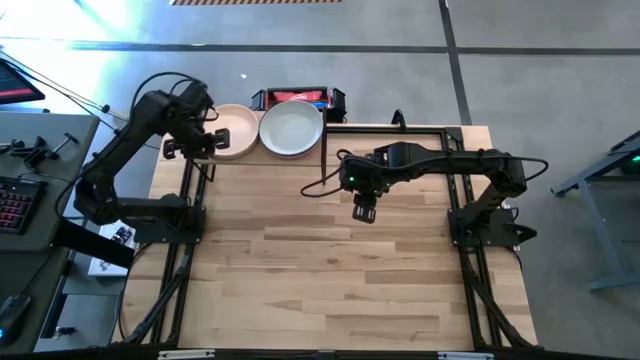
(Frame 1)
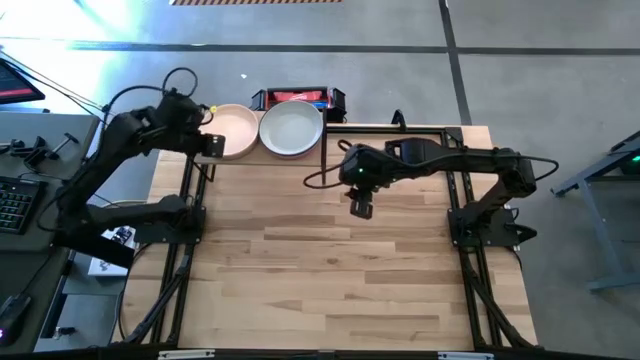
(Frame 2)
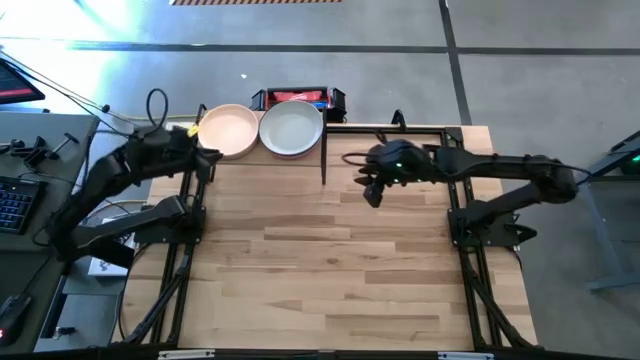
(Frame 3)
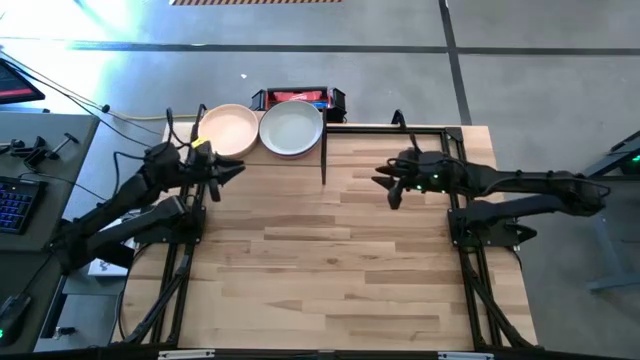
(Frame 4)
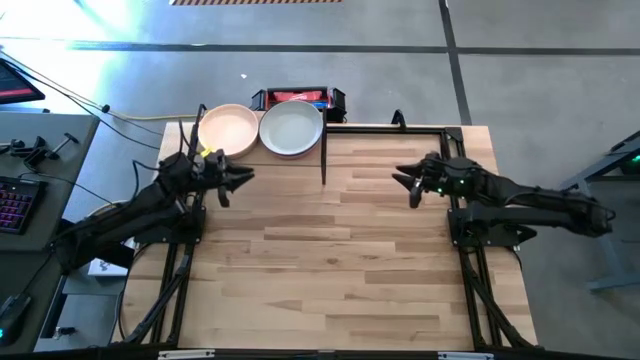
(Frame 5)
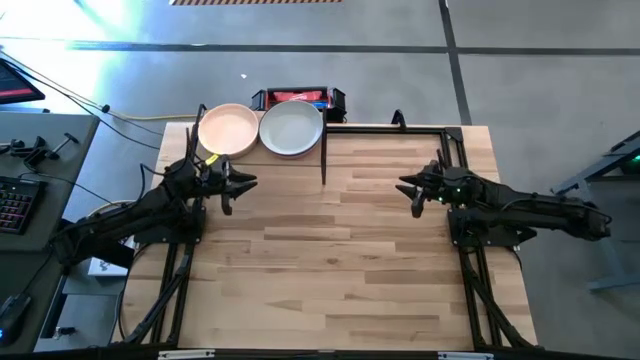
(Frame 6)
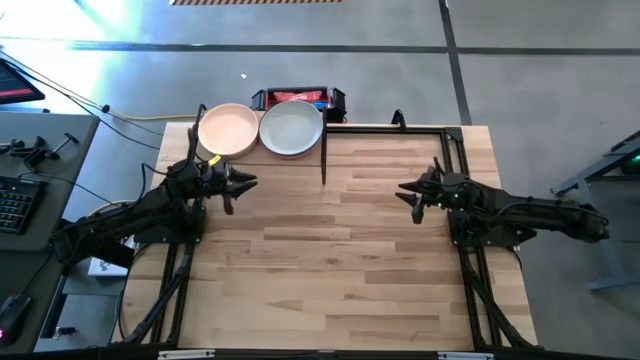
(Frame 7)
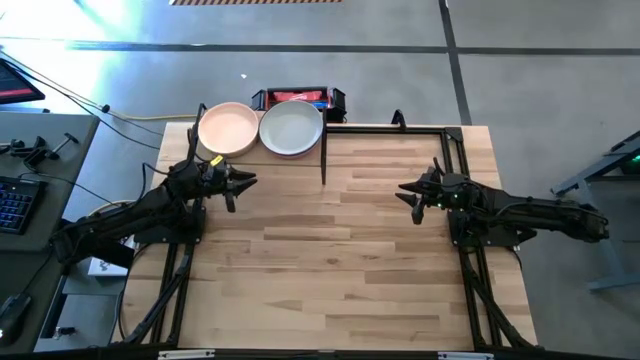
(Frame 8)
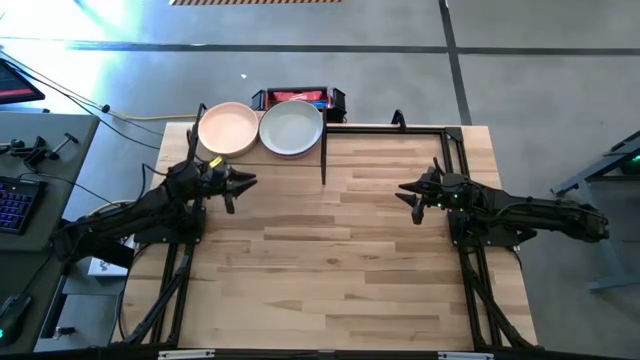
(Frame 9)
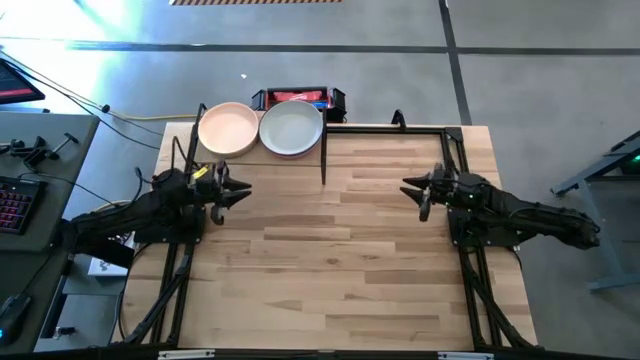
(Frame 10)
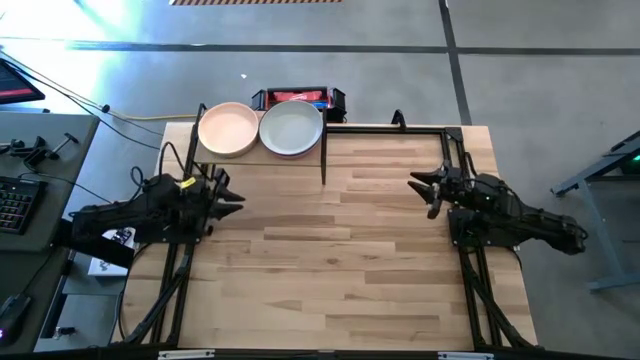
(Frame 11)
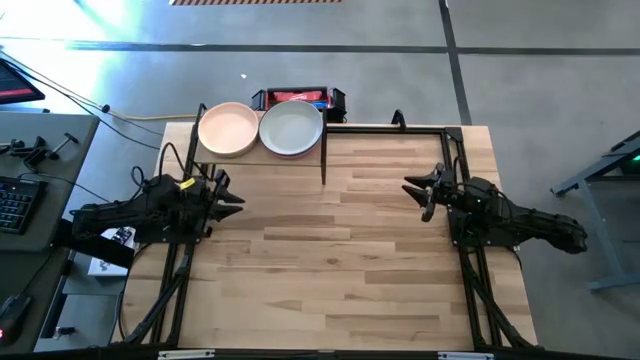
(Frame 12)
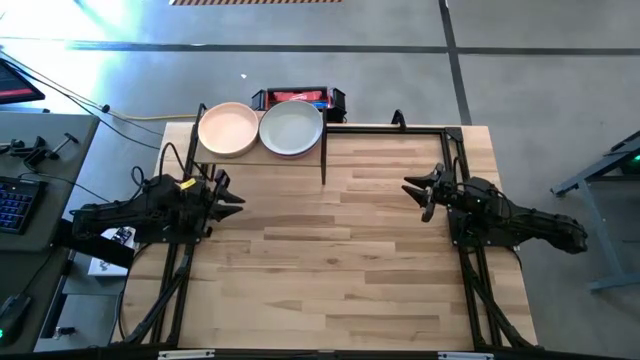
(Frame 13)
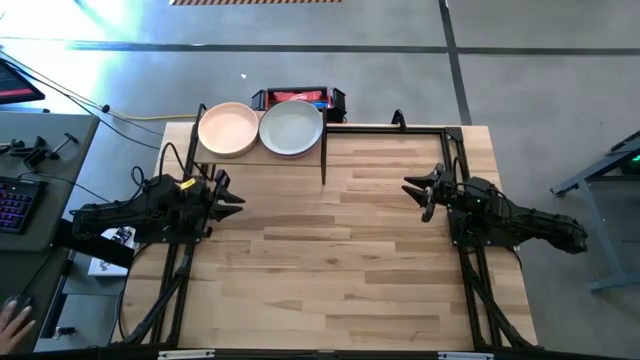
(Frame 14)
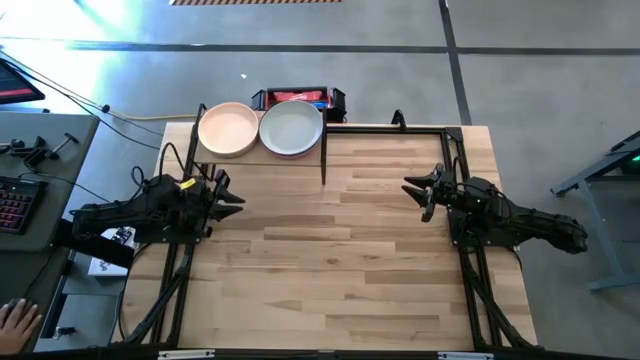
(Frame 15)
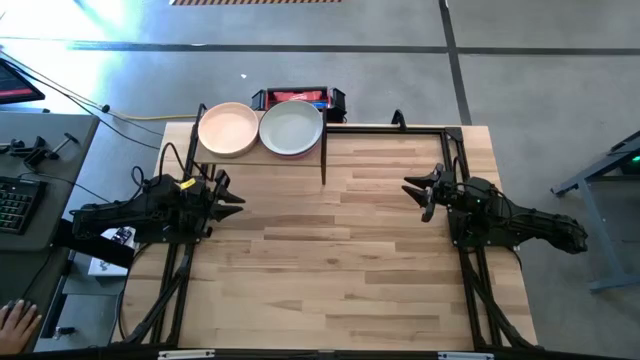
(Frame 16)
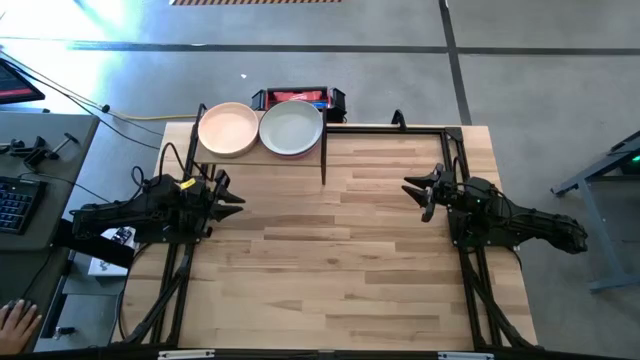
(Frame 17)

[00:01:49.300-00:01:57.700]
Task: Place and stack plates onto a shelf
Return to Home Position

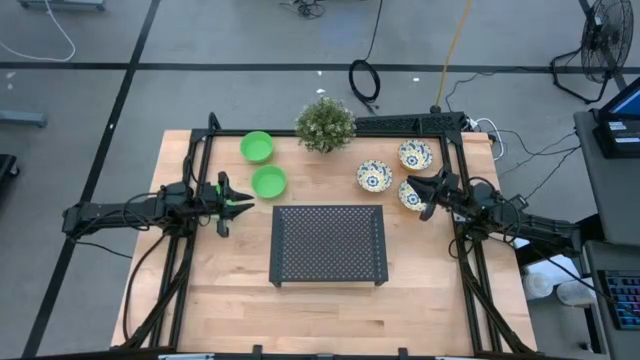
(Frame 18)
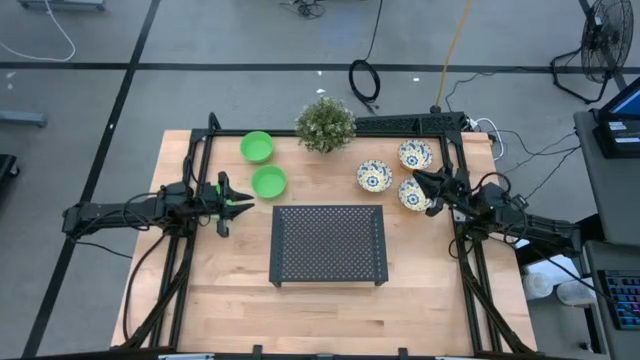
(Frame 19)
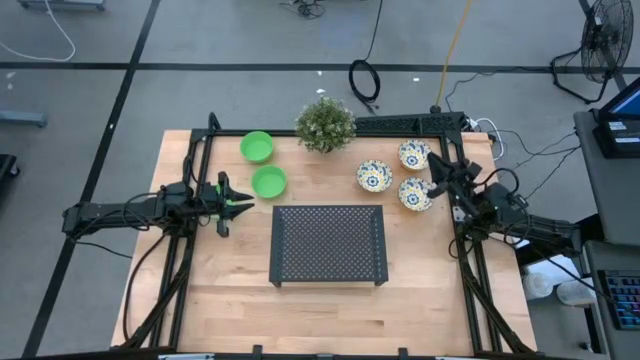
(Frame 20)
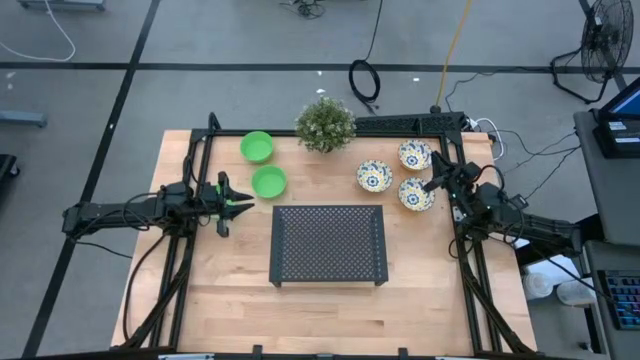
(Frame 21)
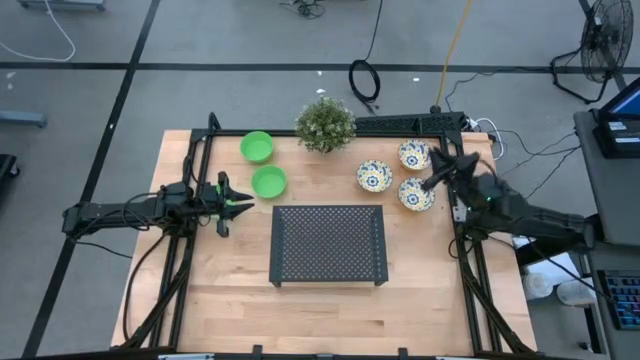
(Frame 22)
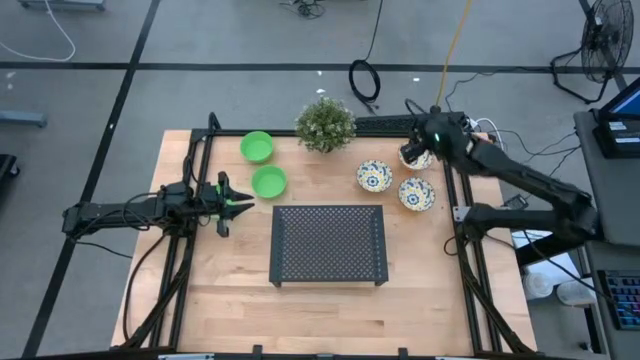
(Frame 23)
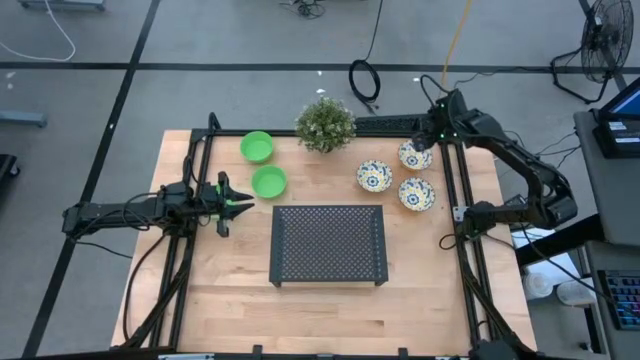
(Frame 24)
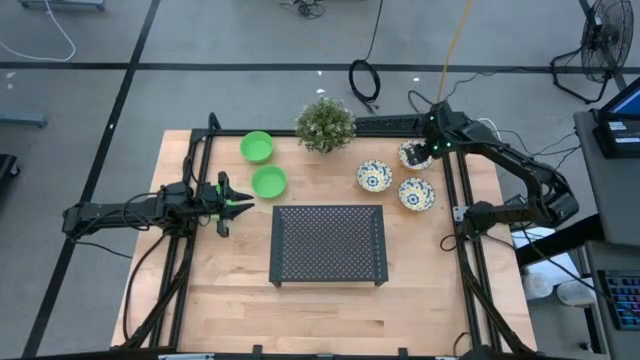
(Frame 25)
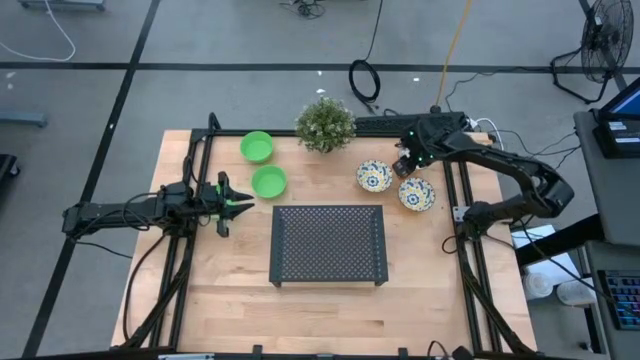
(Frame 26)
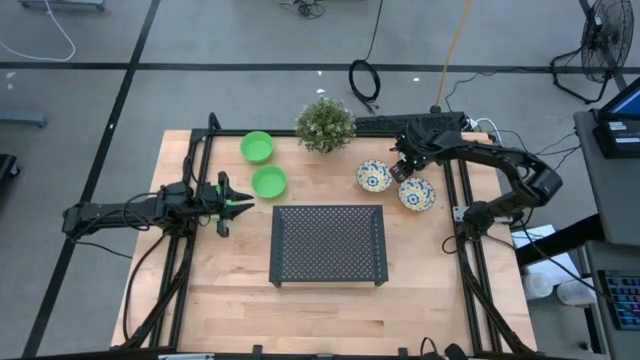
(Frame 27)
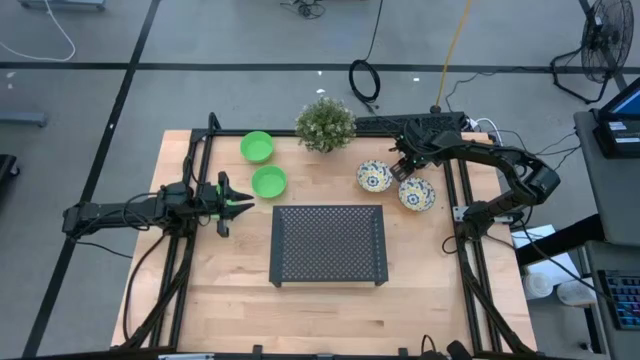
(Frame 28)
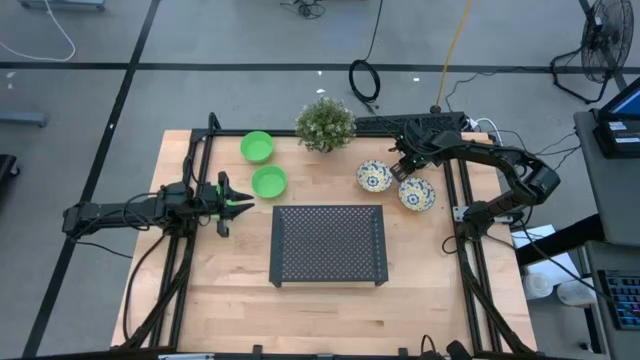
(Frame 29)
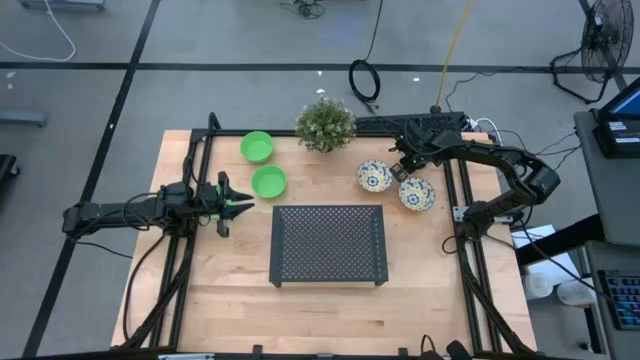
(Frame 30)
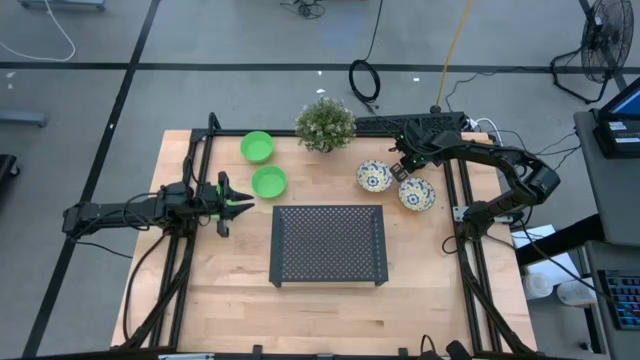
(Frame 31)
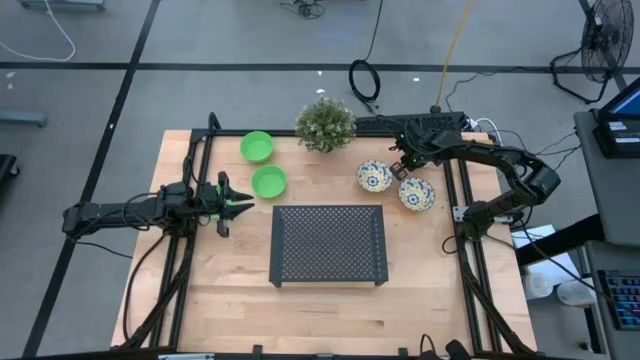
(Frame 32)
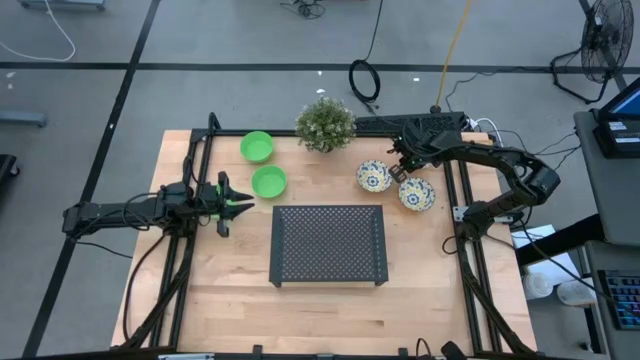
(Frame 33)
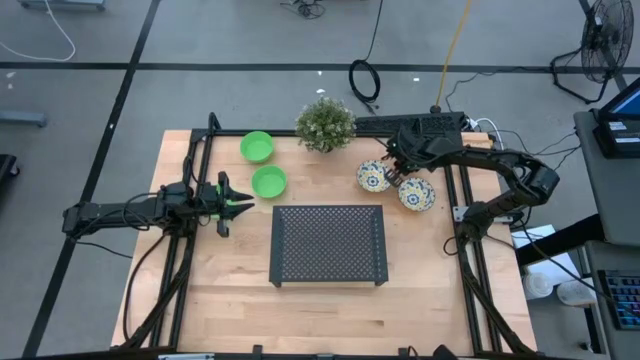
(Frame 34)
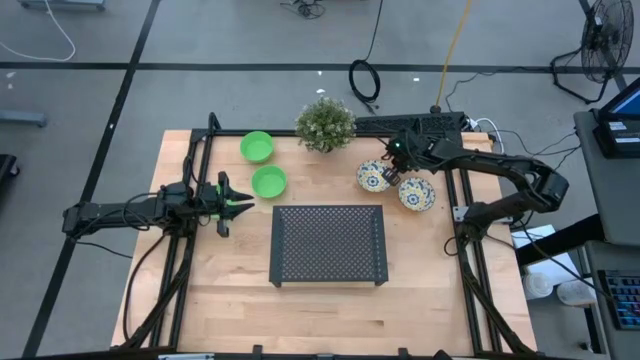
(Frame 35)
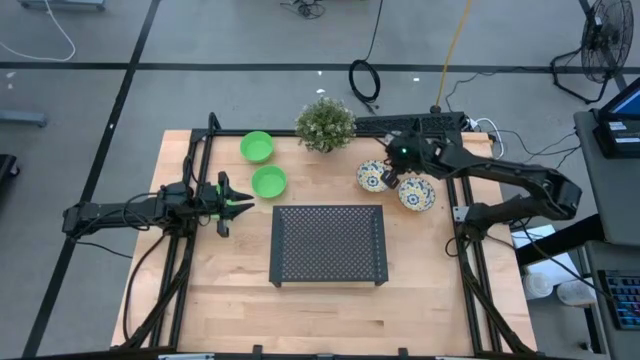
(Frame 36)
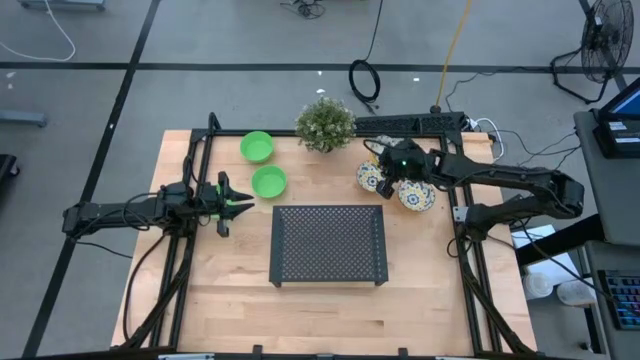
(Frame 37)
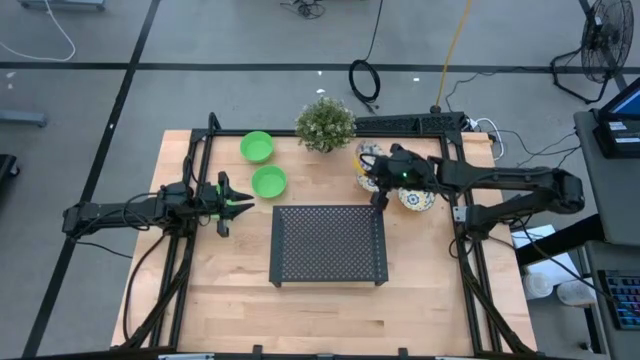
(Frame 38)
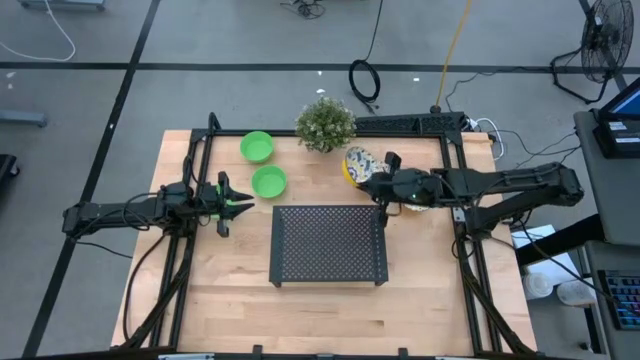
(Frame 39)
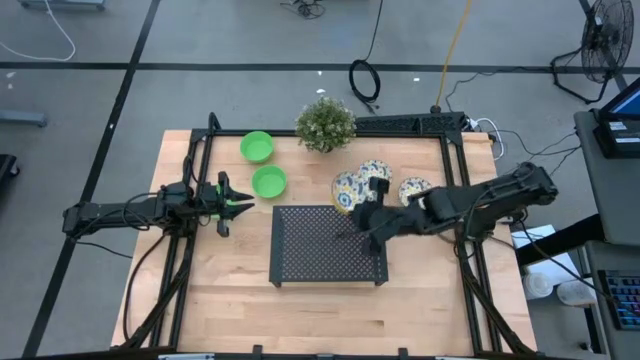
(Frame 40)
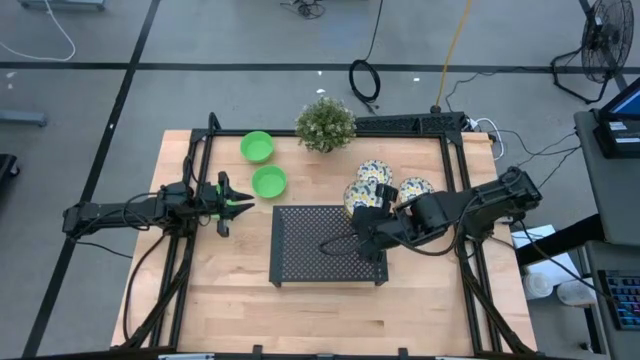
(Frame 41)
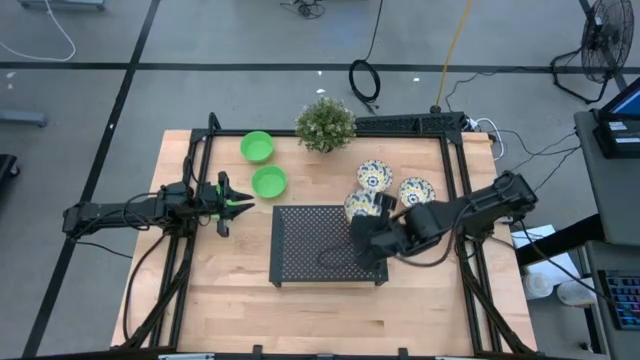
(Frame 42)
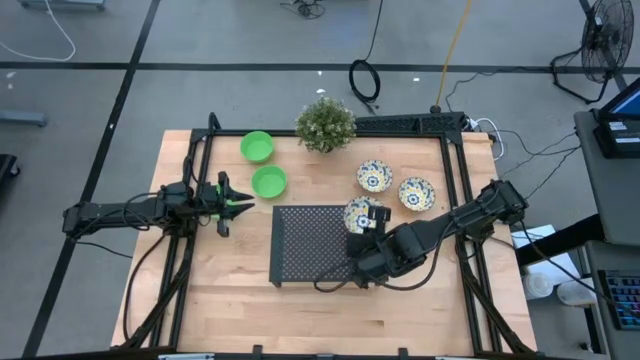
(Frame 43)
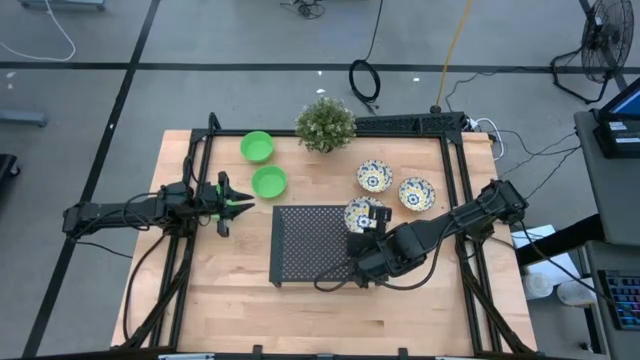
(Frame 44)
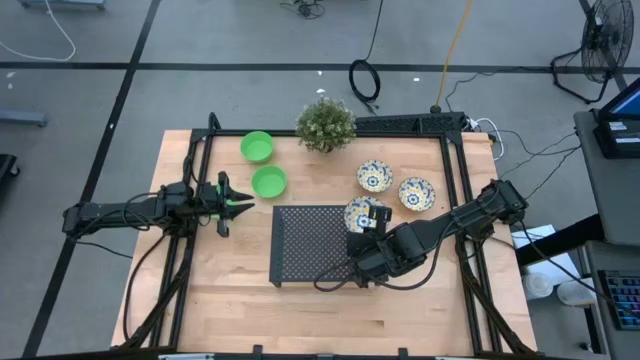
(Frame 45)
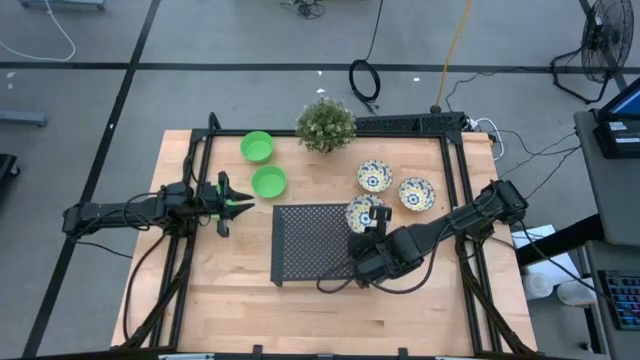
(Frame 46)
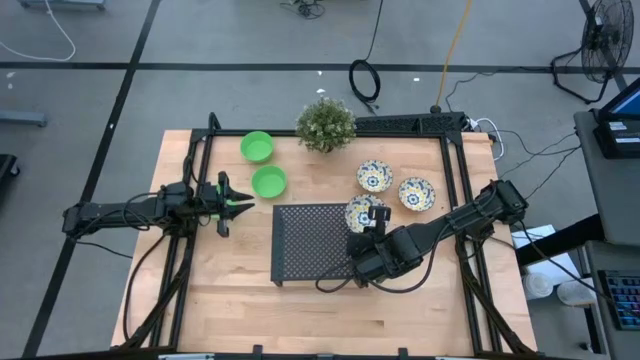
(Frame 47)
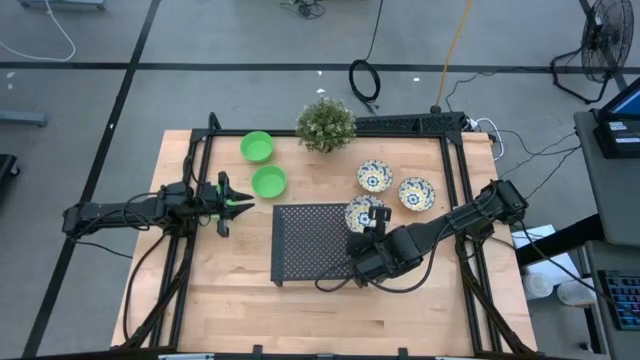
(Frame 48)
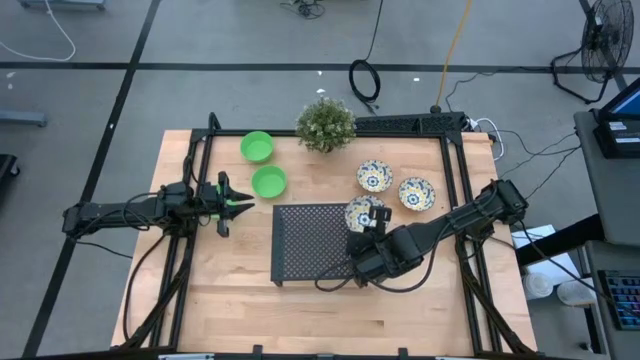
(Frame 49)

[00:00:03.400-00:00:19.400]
Task: Pick & Place Mini bowls
Put the top right white patterned bowl on the shelf
